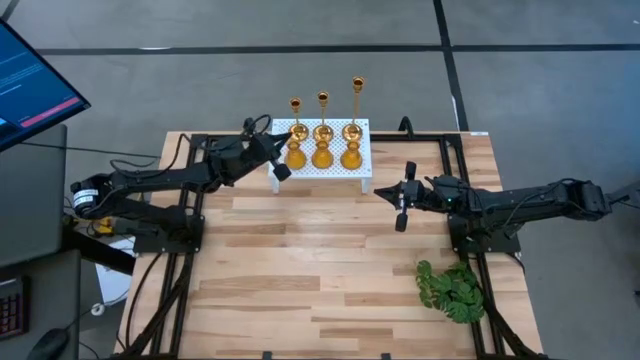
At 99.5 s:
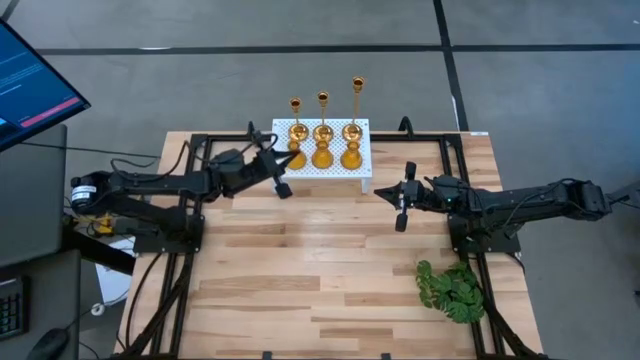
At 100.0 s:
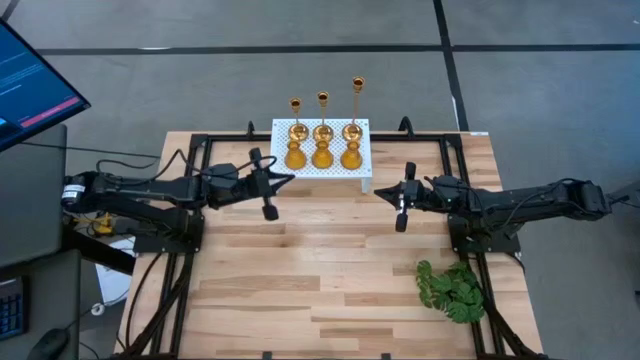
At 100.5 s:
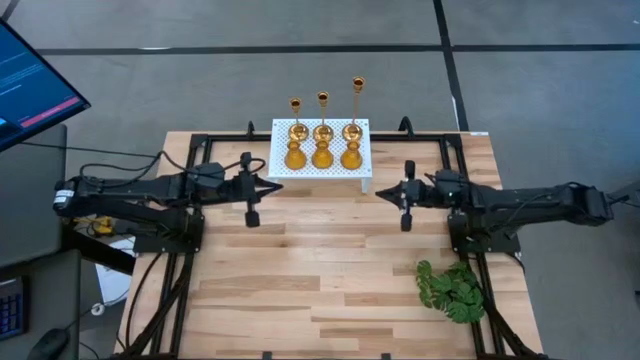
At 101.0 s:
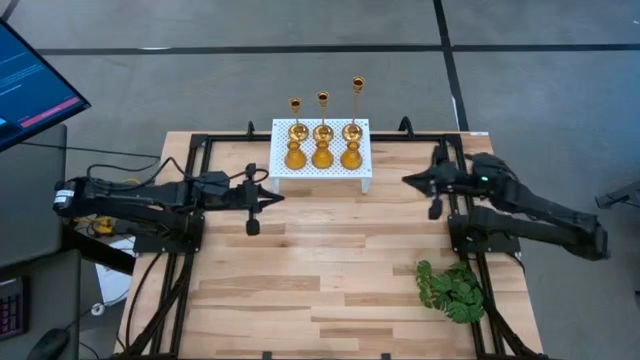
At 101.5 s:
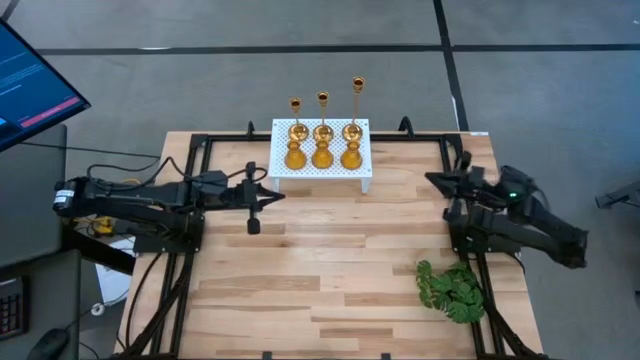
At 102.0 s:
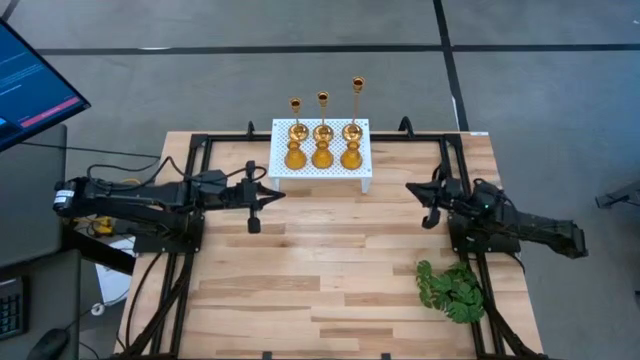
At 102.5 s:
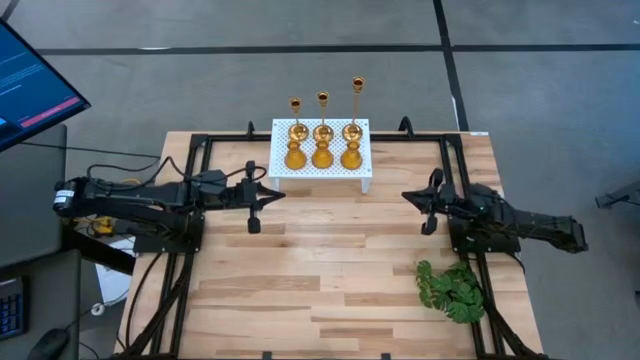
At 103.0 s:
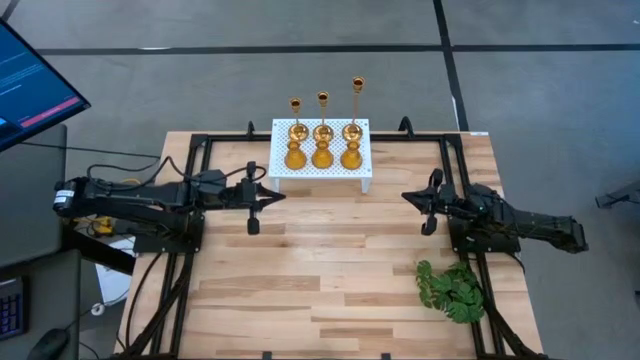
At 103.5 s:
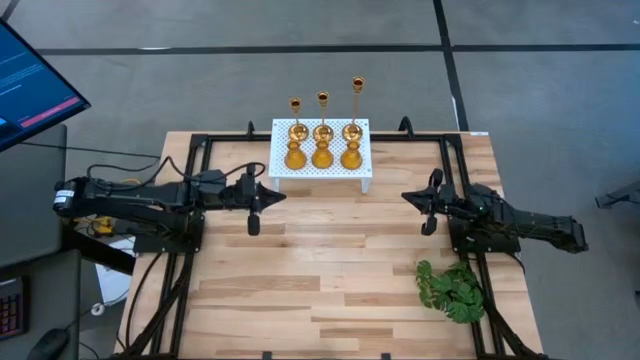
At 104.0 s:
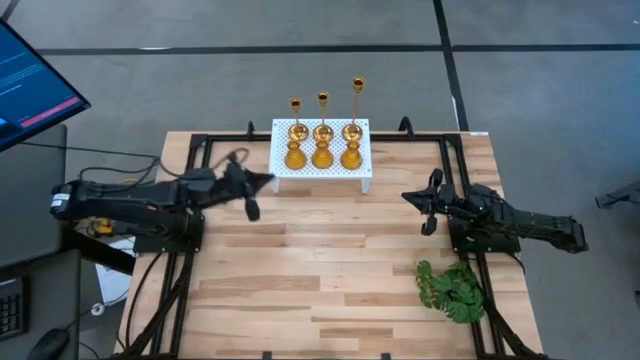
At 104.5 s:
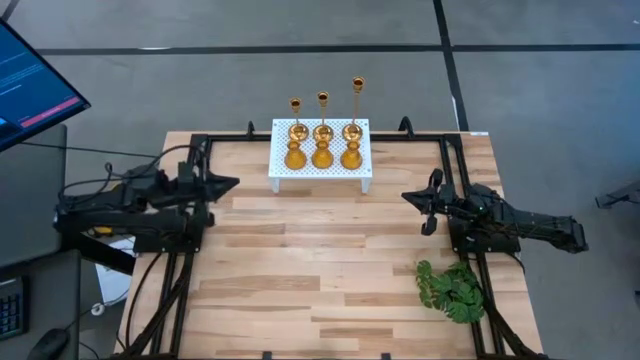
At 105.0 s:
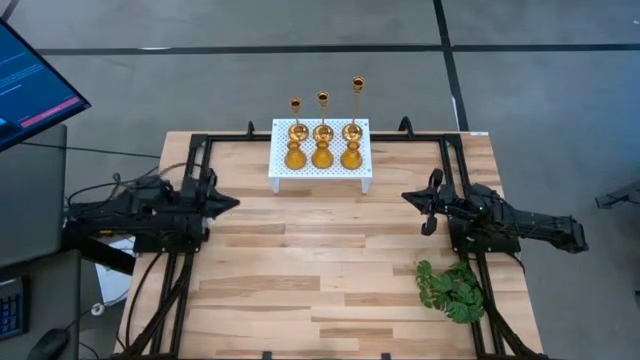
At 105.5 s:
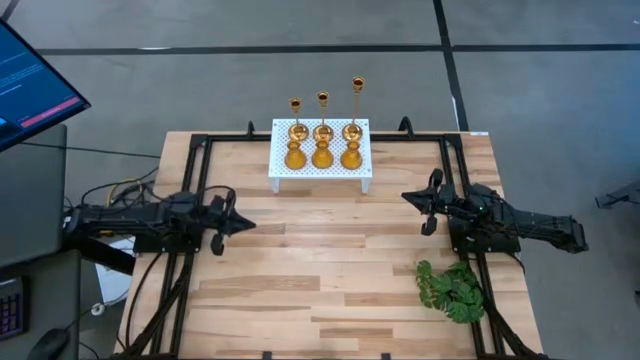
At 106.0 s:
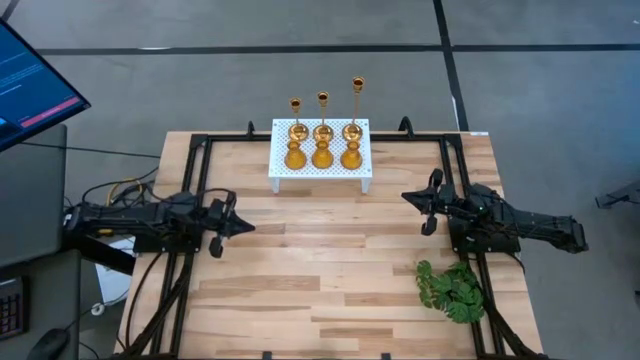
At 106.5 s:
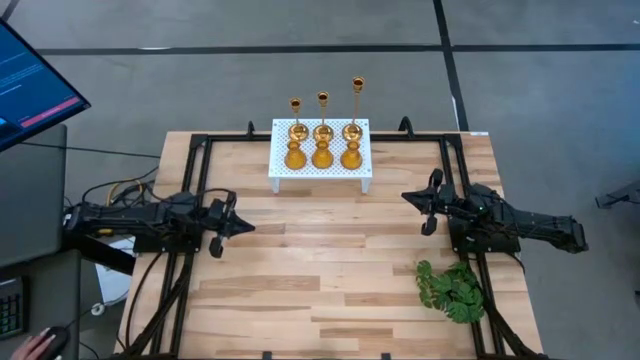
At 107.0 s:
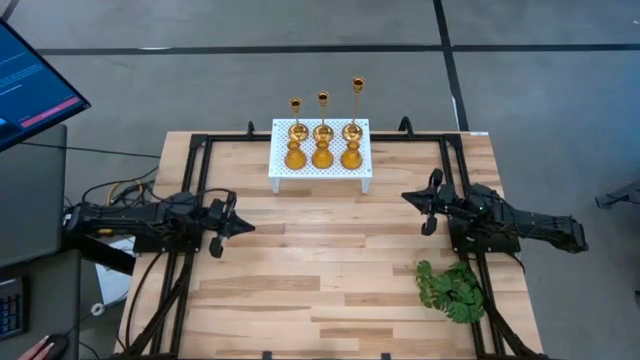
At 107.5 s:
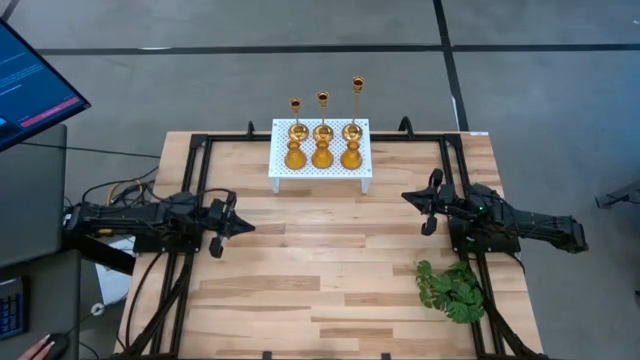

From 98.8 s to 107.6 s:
Task: Pick & Place candle stick holders
Return to Home Position

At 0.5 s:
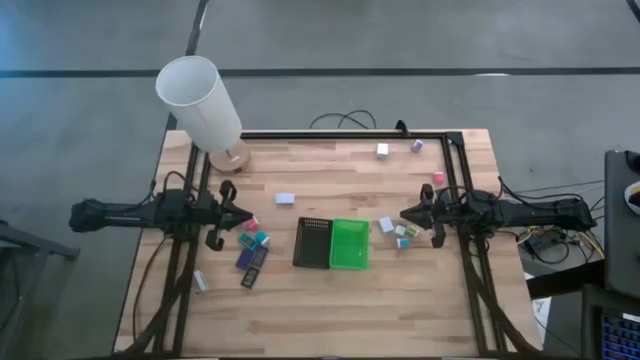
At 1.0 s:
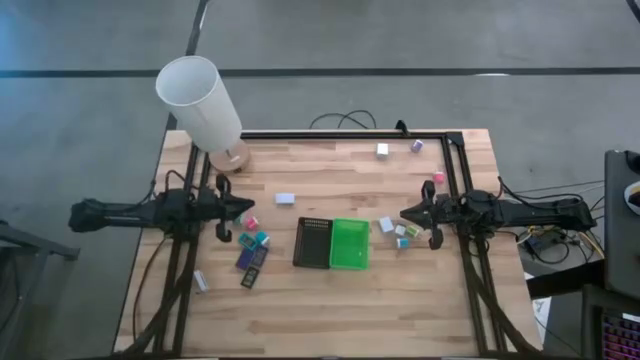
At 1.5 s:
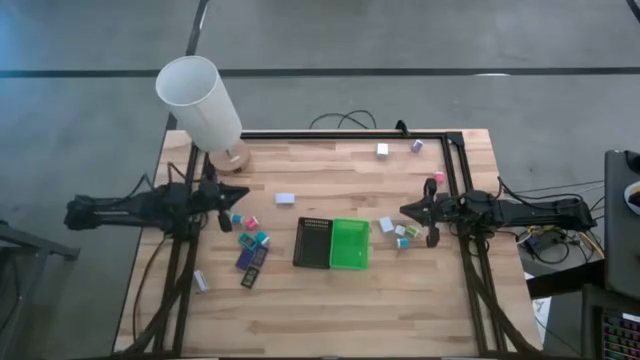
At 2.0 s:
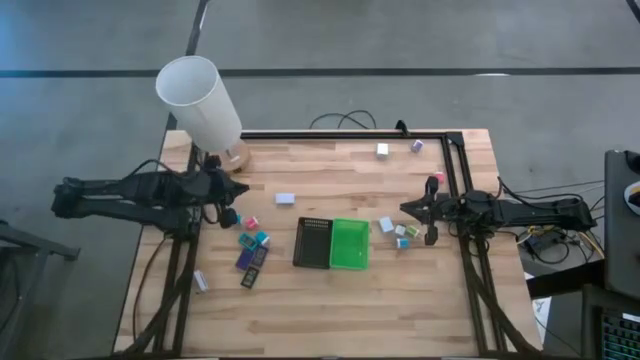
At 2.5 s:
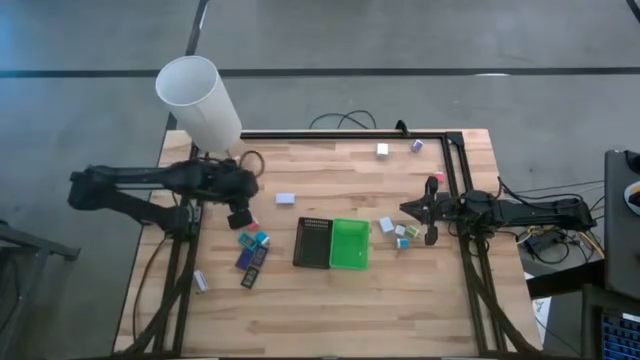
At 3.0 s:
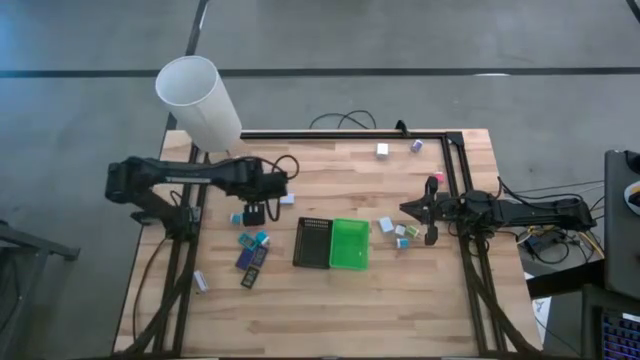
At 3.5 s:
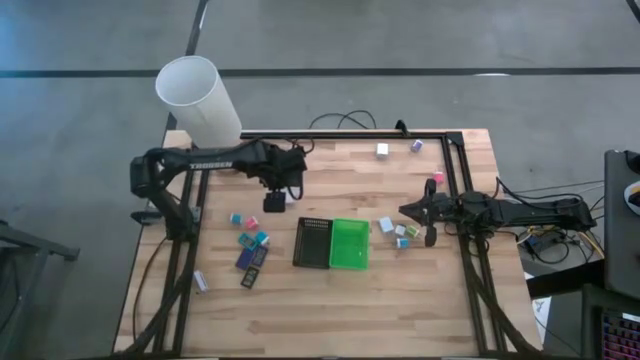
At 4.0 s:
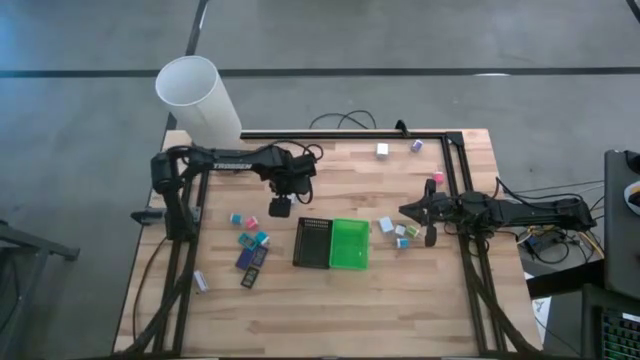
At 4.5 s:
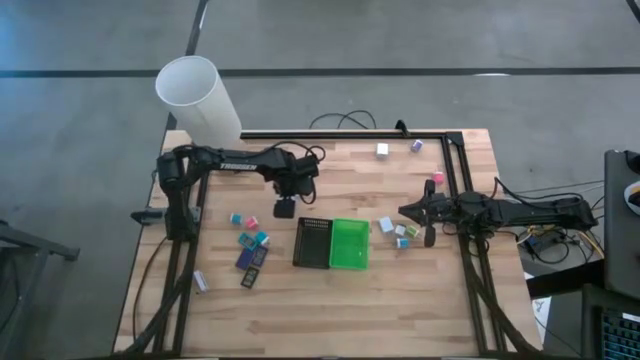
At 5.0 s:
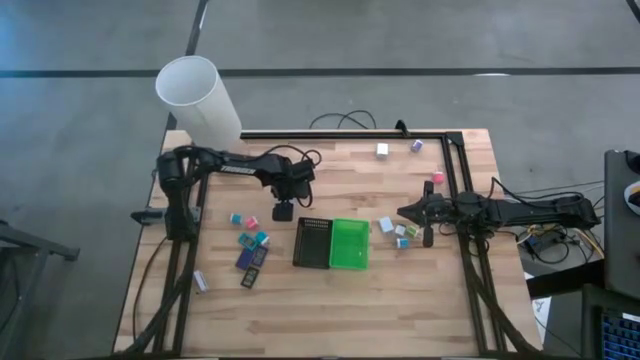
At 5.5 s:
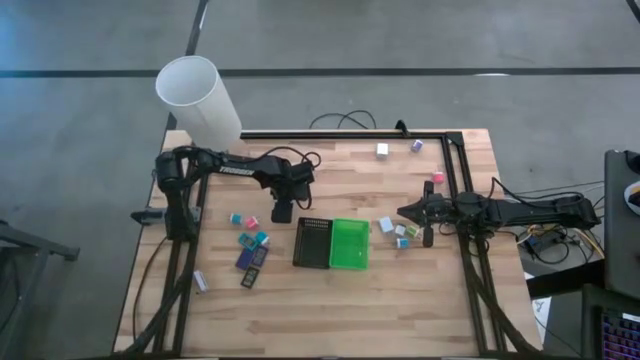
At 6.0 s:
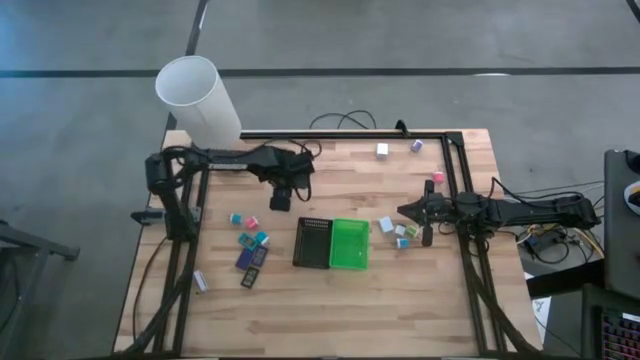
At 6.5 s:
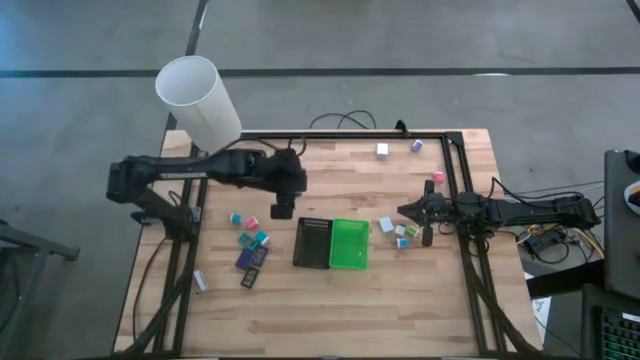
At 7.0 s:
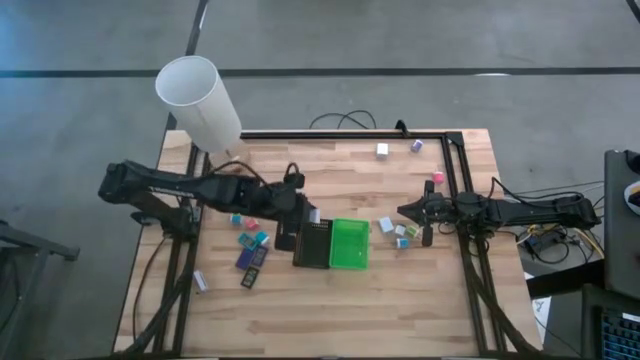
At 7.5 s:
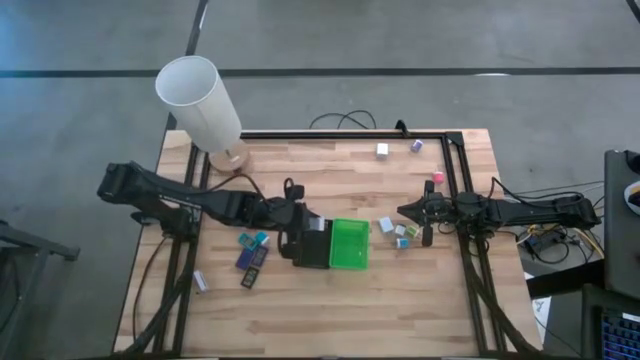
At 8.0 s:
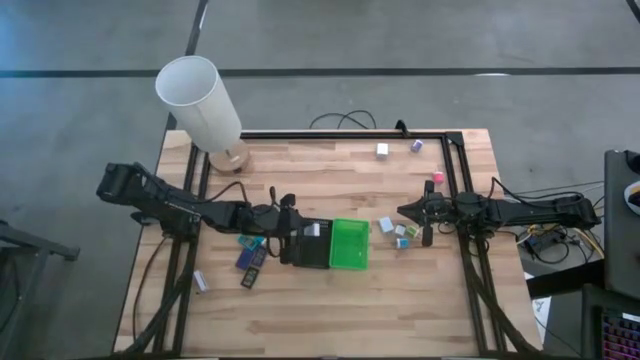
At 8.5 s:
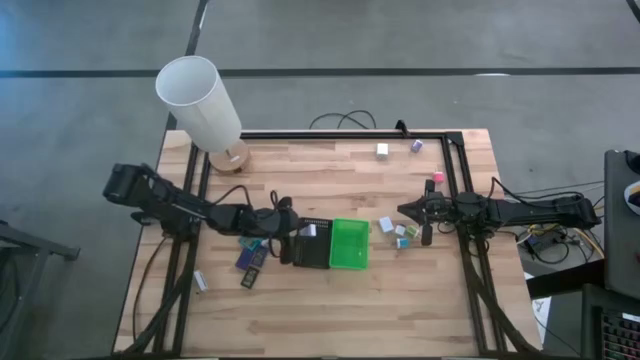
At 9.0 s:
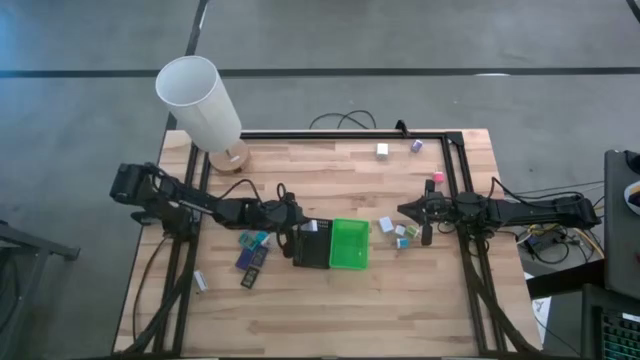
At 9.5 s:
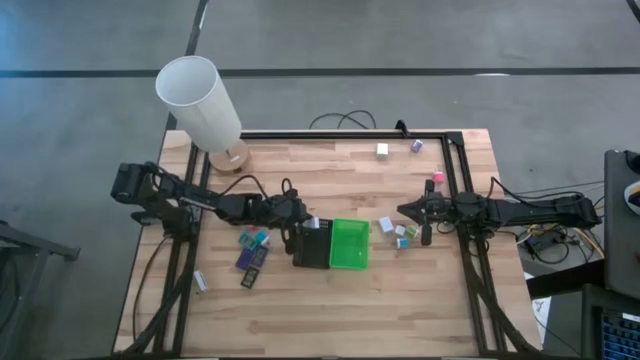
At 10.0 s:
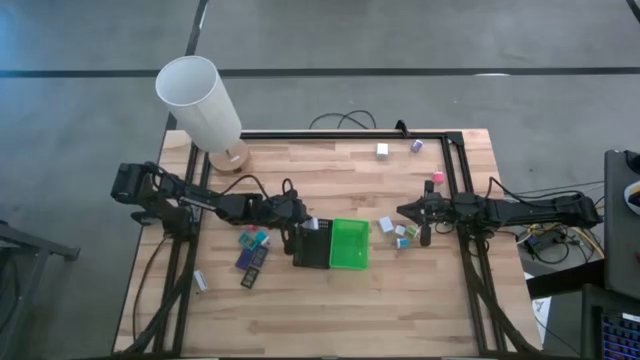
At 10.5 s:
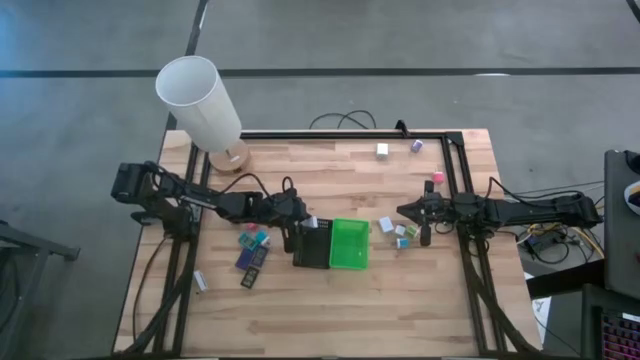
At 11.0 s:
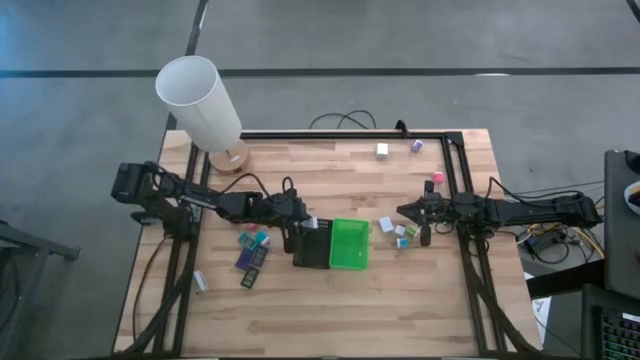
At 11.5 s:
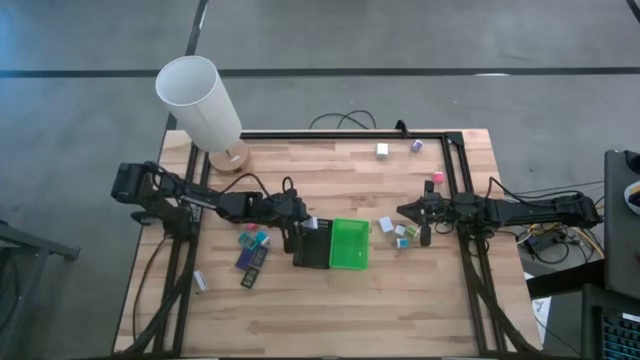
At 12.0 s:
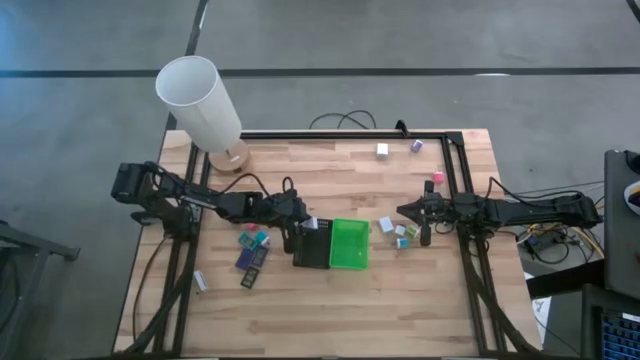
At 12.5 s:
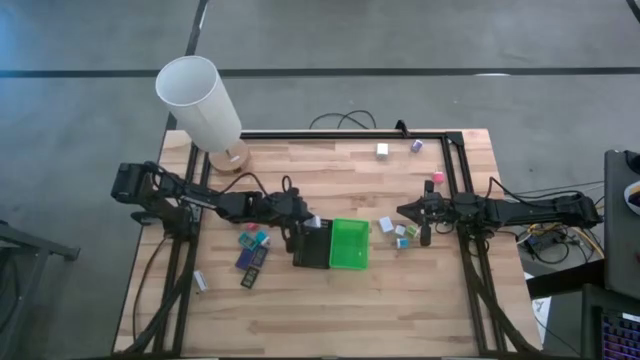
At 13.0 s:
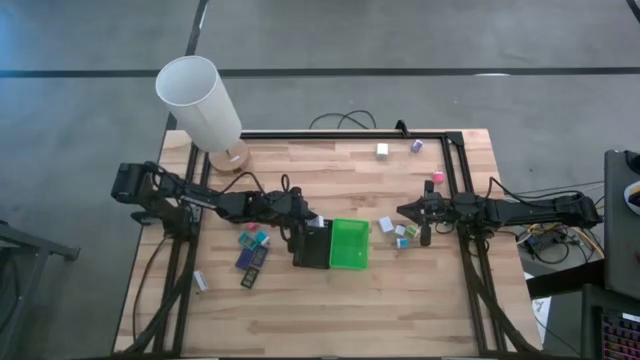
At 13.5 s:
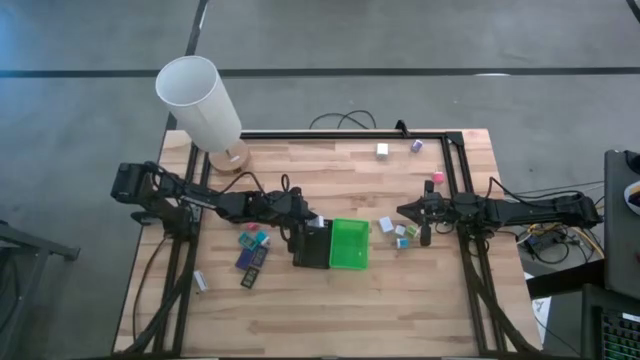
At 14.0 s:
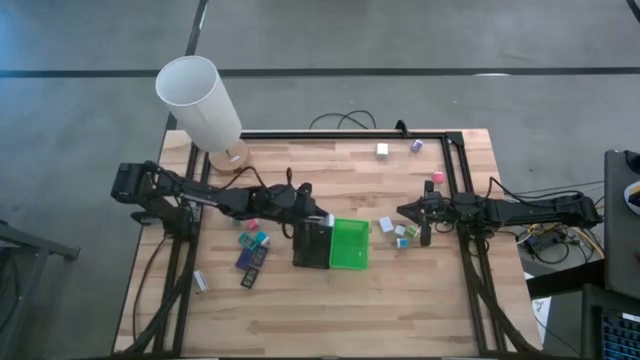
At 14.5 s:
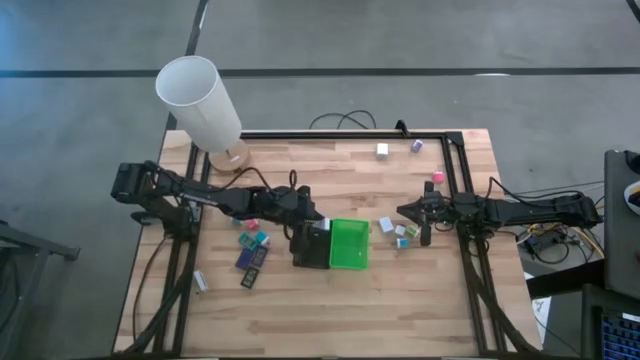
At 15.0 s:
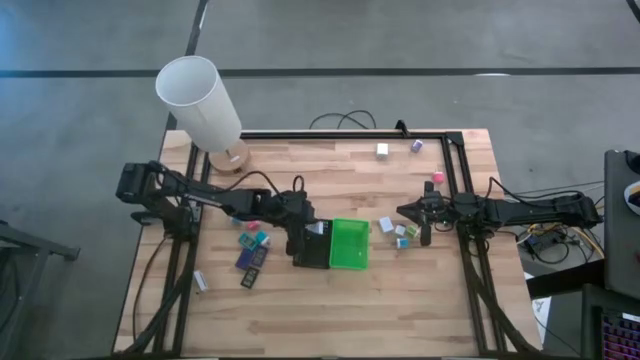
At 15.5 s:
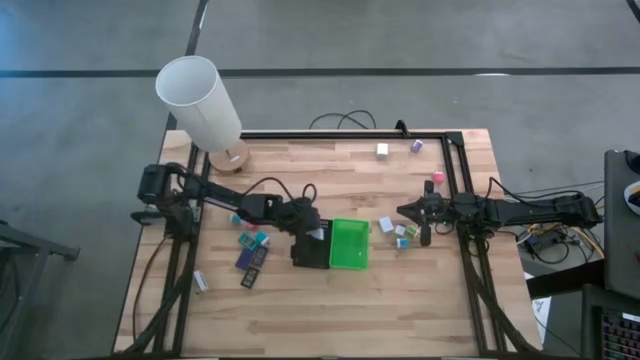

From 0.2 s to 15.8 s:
Task: Pick & Place Office items
Put the top white digital clock into the black basket
